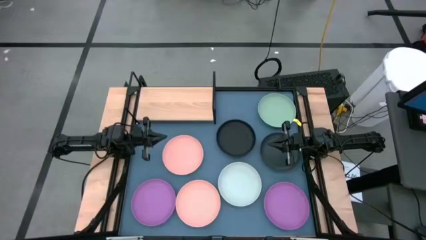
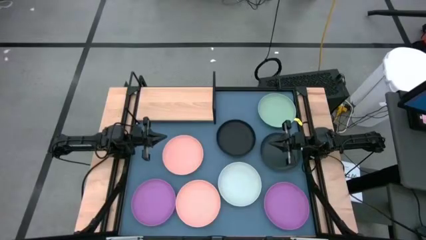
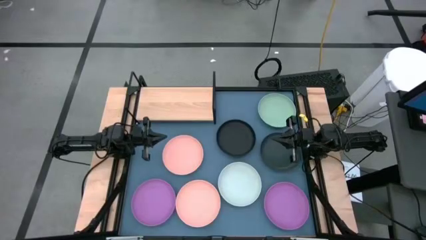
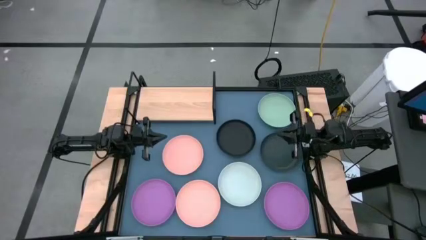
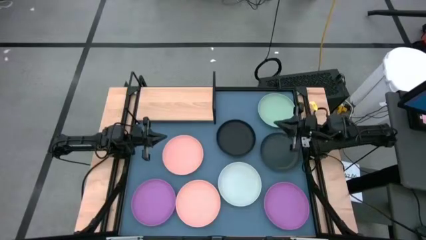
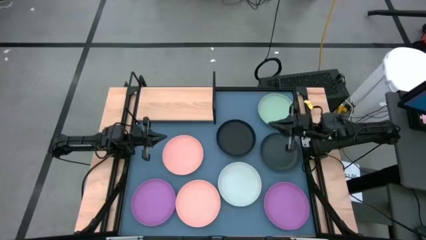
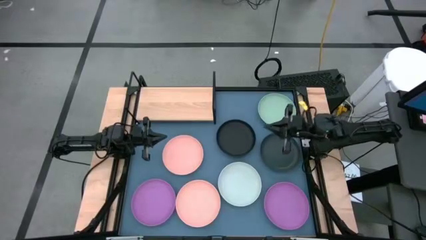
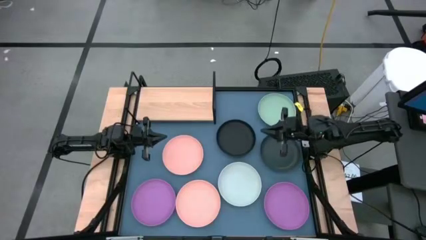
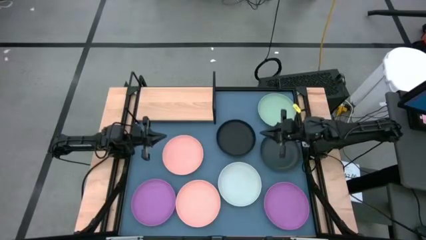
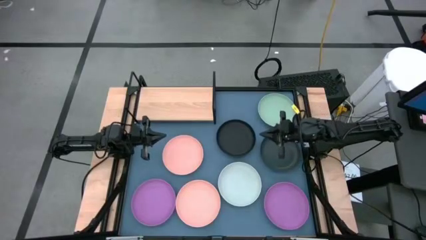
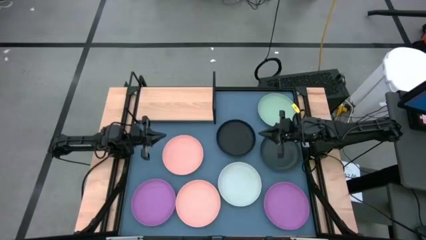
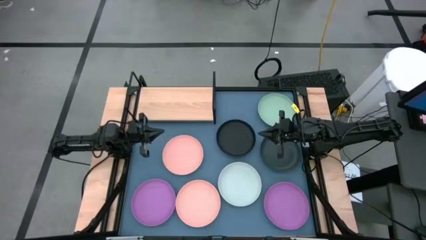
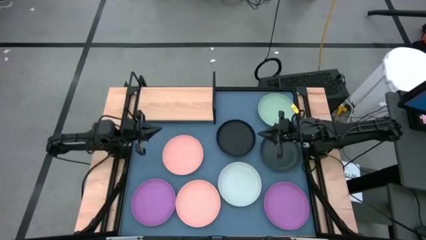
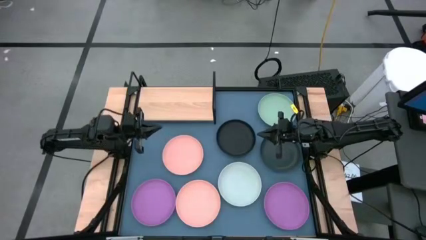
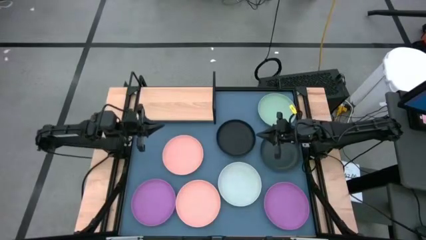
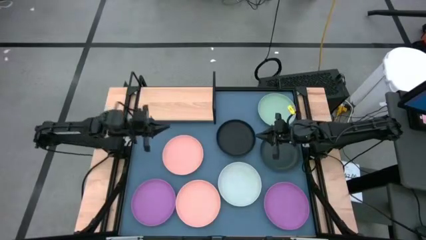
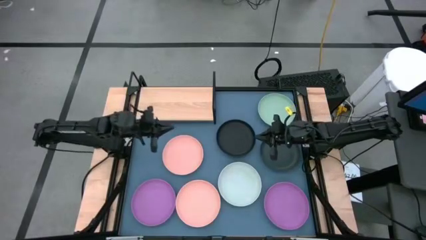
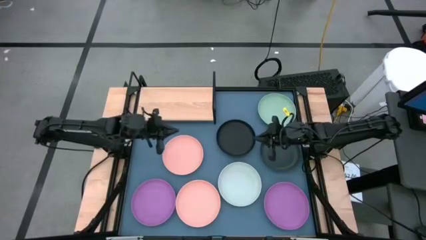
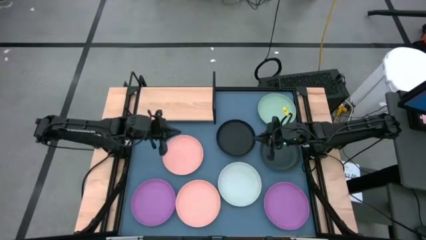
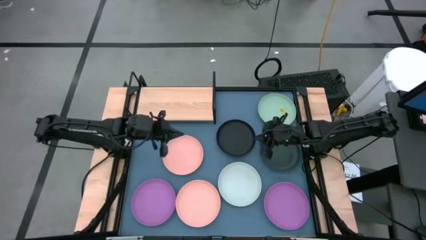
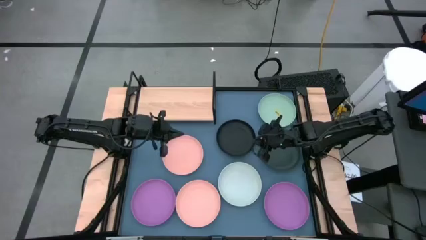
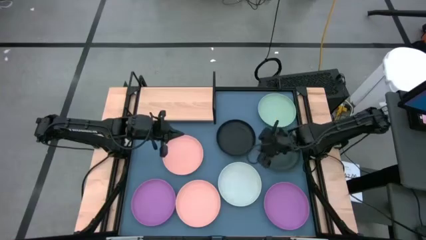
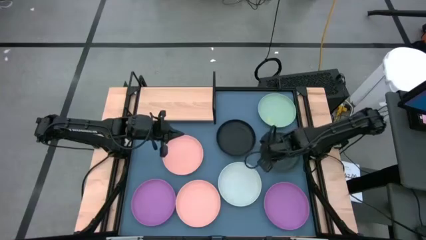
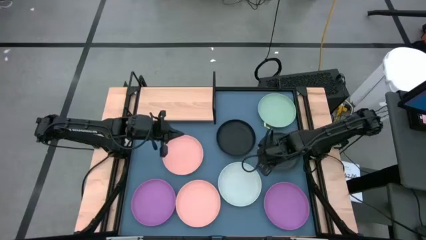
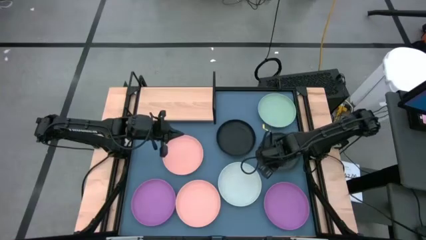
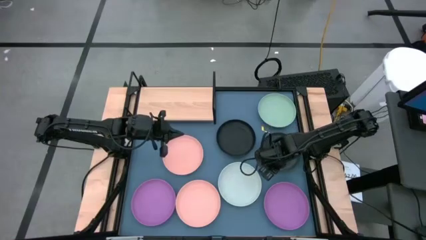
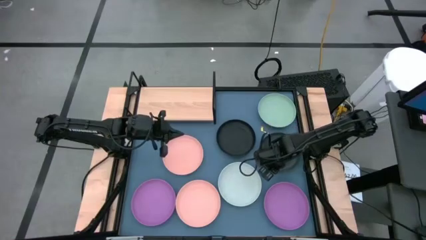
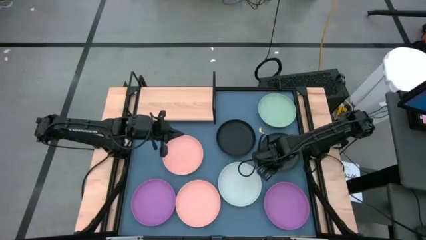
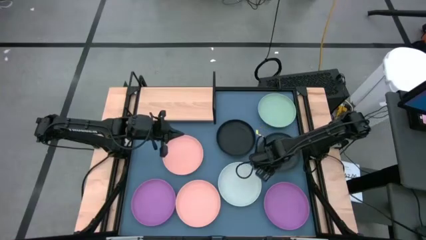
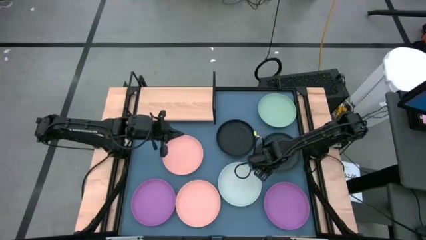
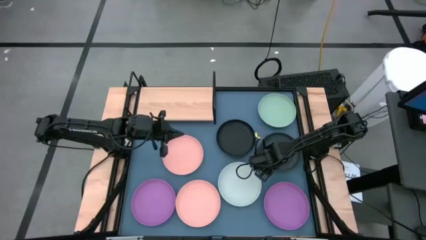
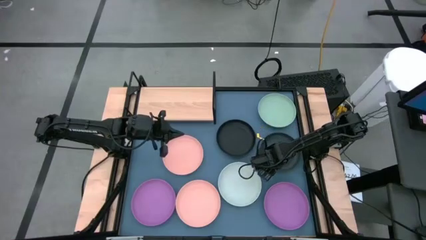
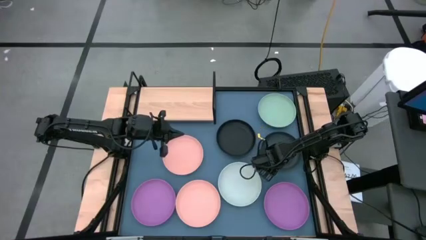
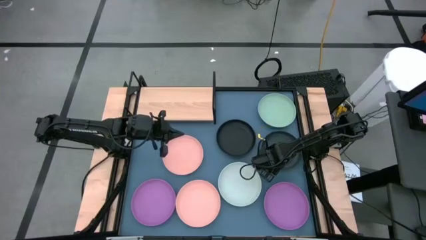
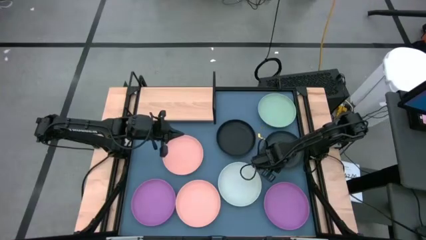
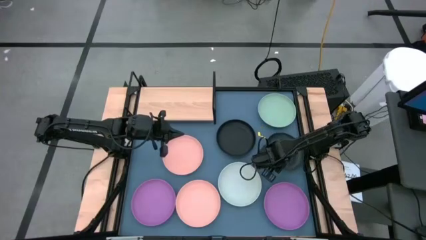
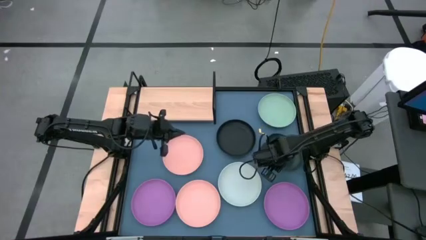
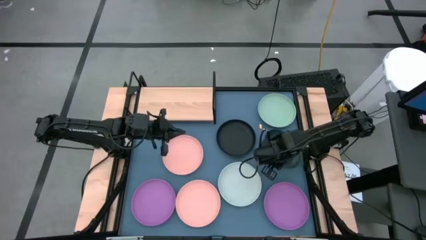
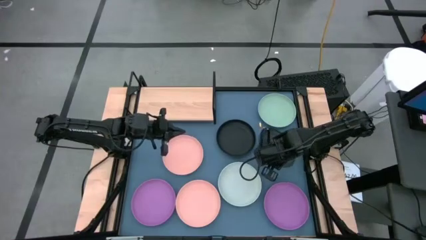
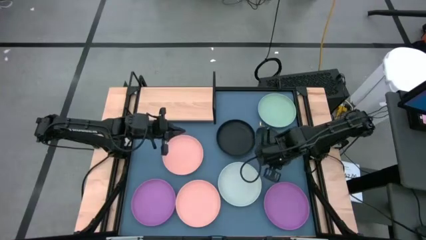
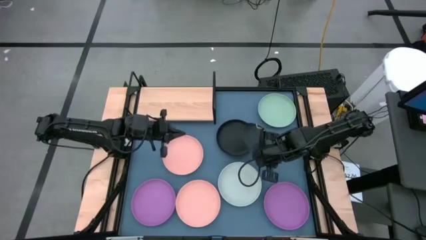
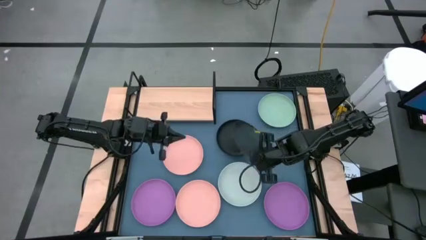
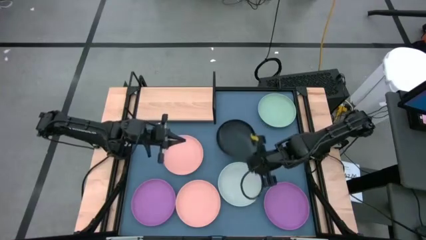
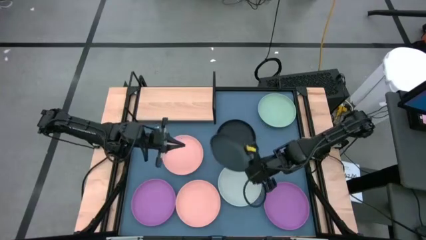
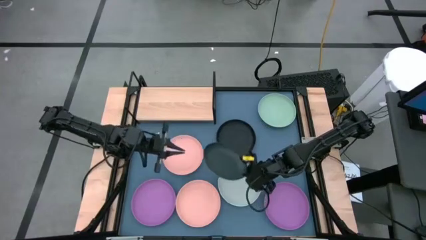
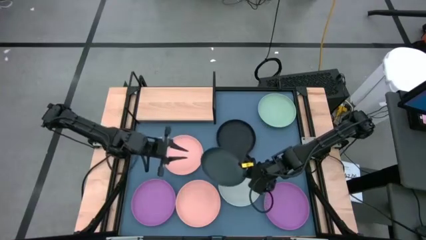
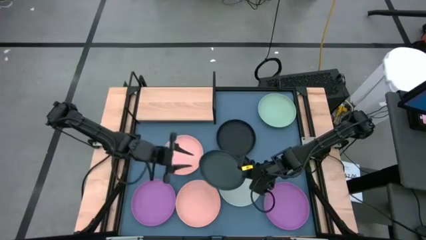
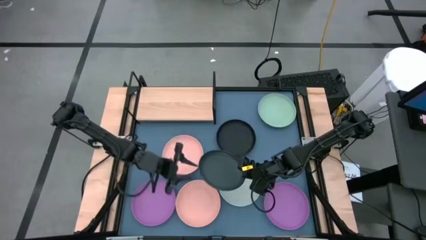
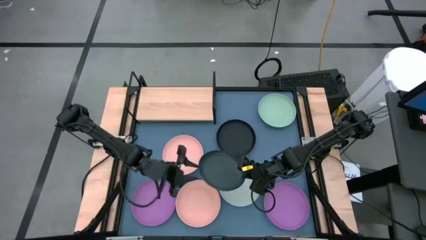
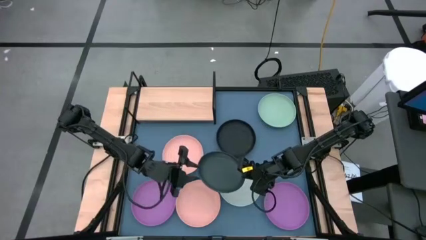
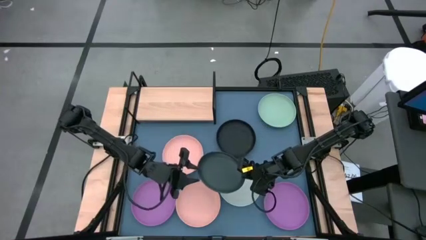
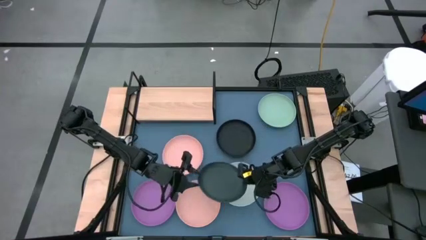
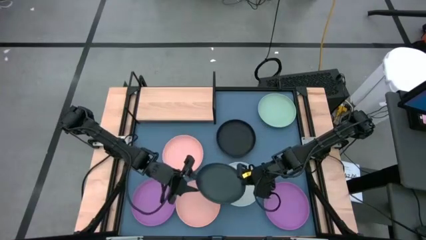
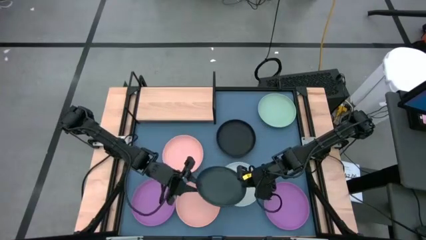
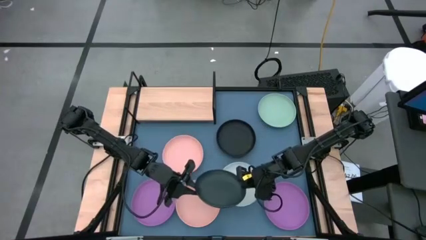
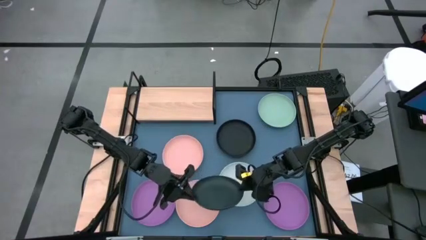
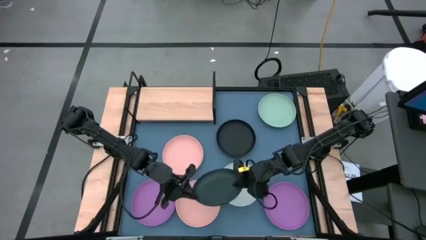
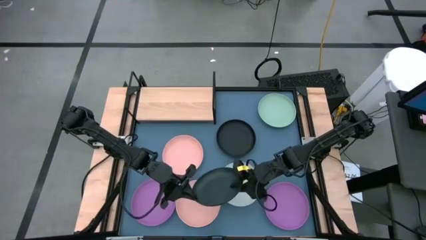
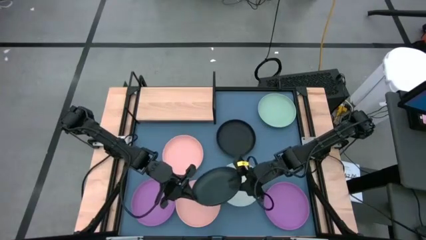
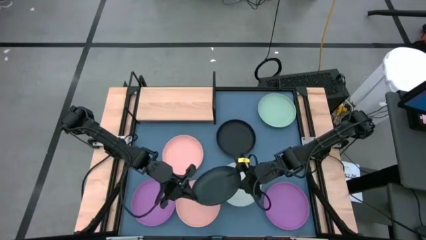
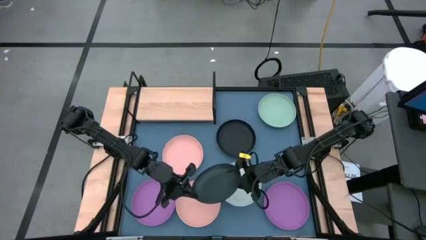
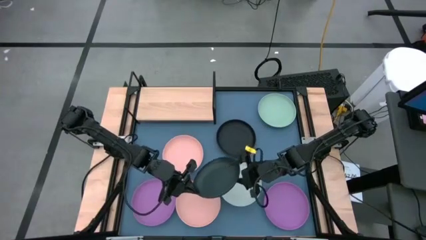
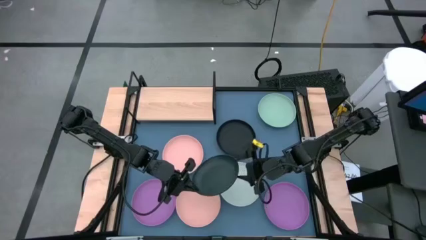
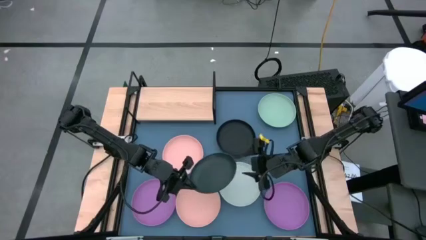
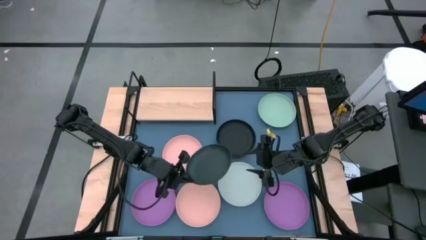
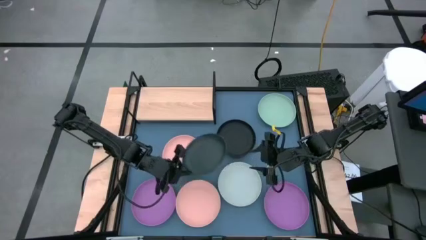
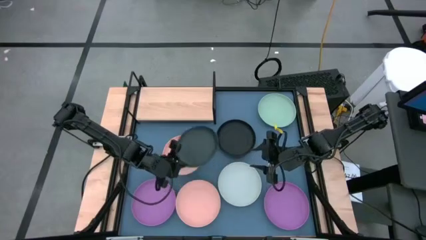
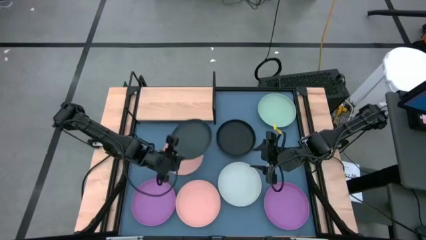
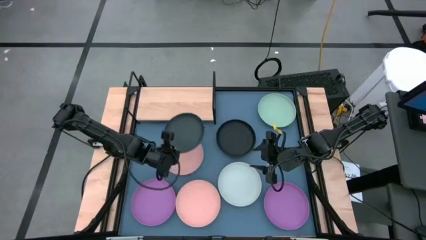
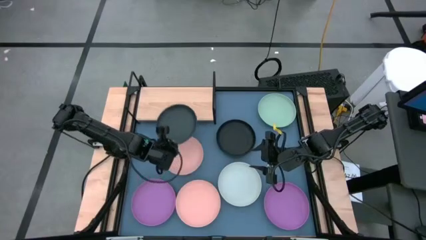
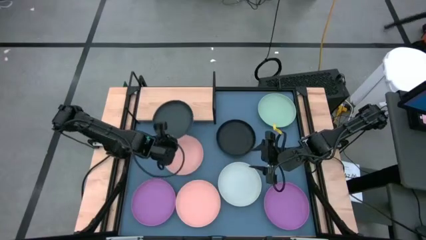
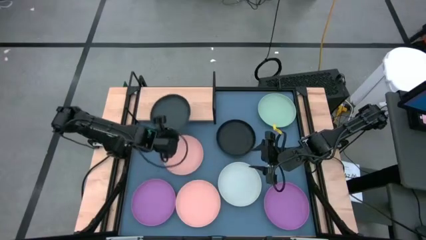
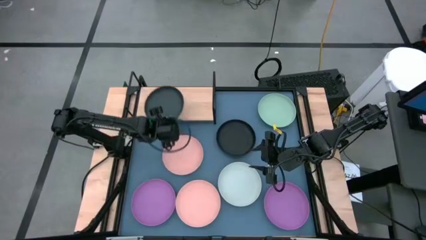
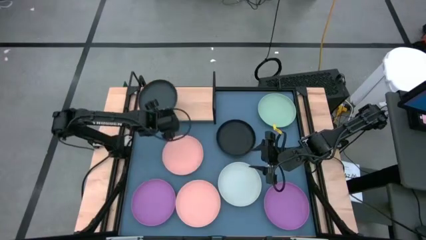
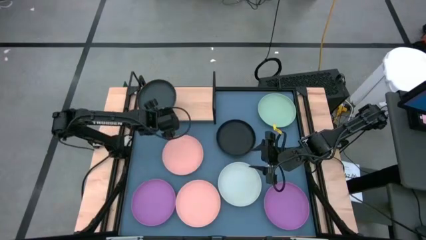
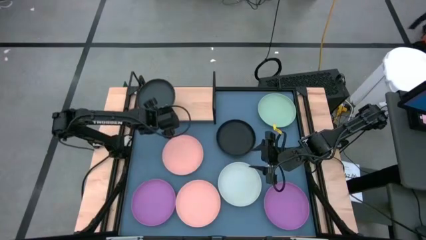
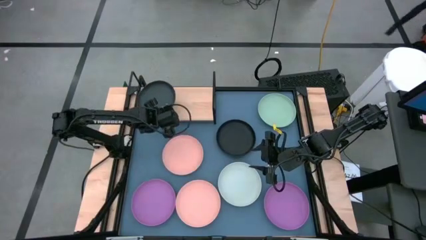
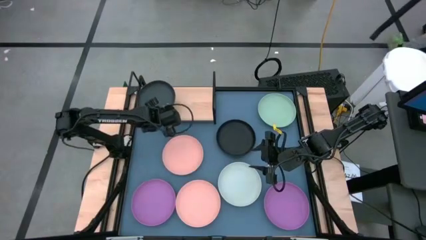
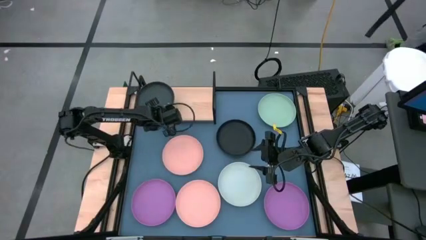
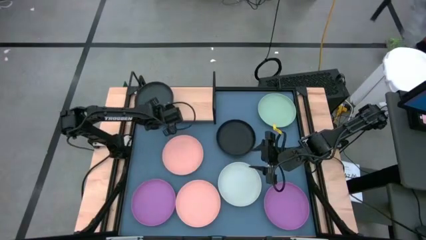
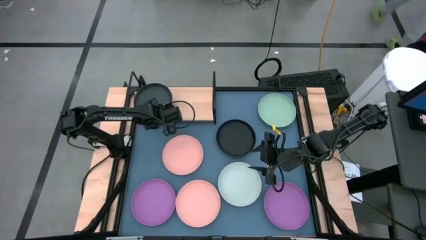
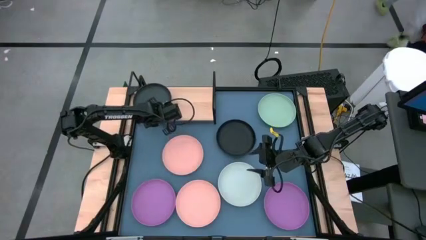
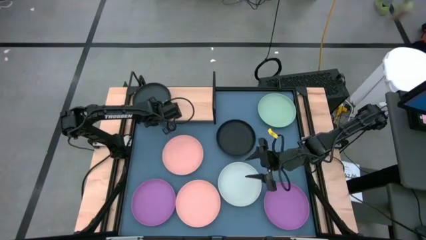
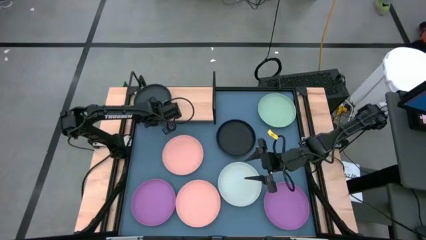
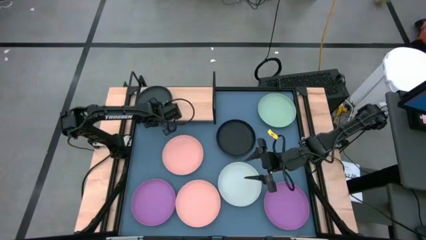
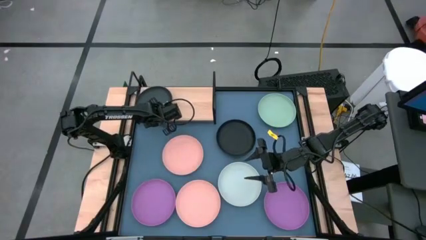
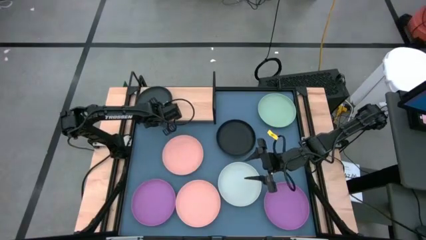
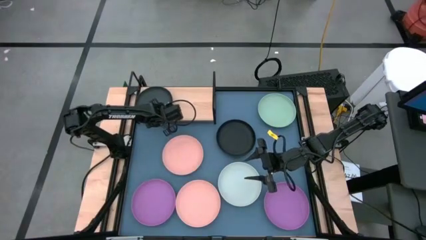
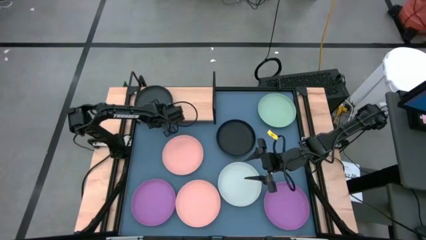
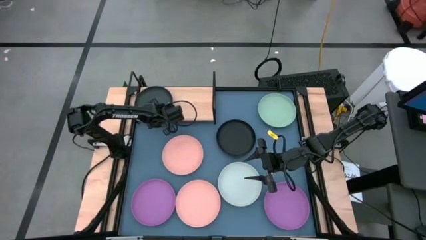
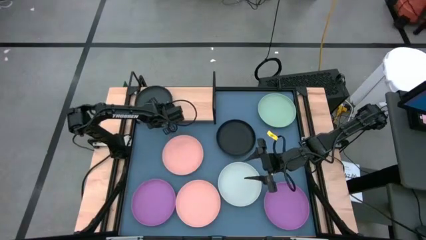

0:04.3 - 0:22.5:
Task: Place and stack plates onto a shelf
Put the right black plate on the shelf
